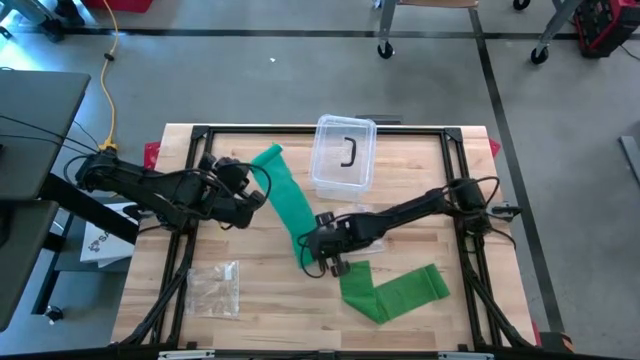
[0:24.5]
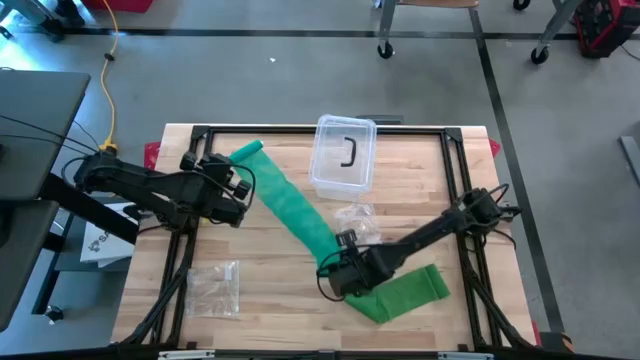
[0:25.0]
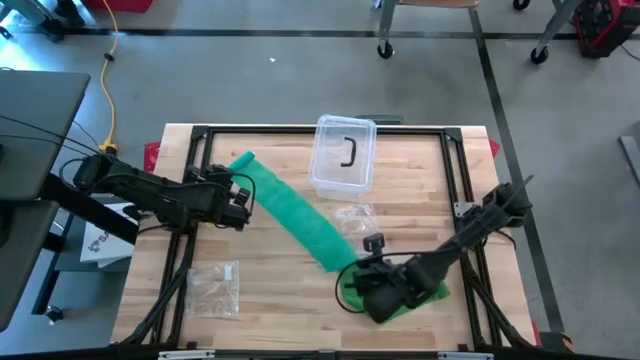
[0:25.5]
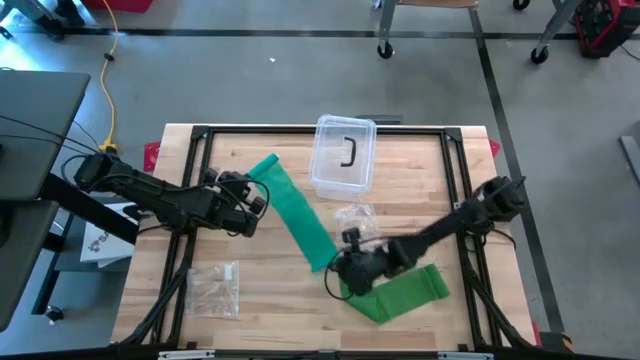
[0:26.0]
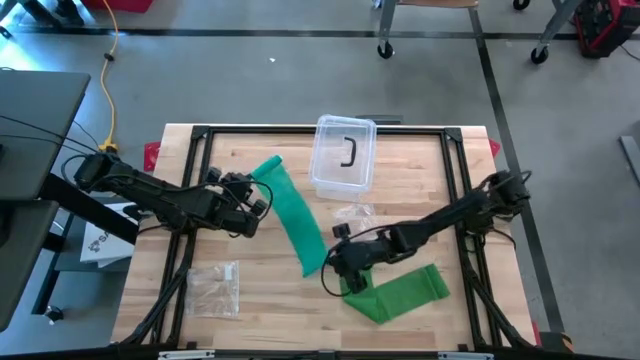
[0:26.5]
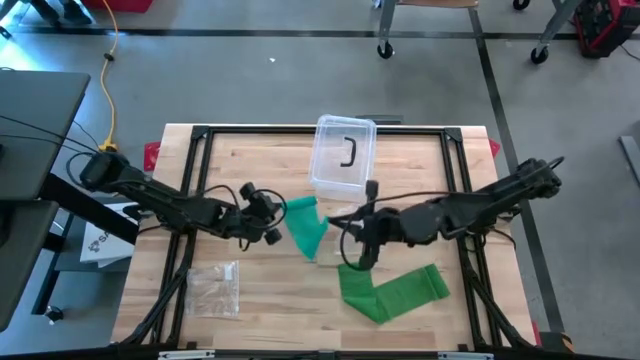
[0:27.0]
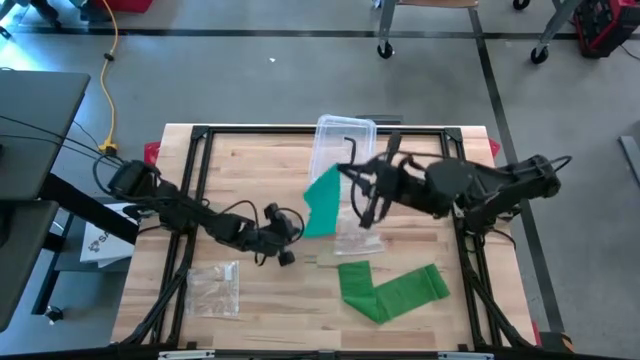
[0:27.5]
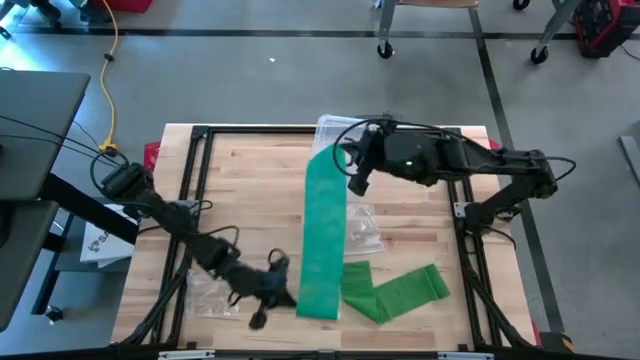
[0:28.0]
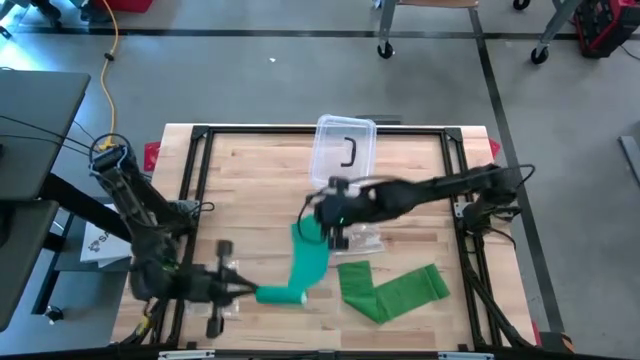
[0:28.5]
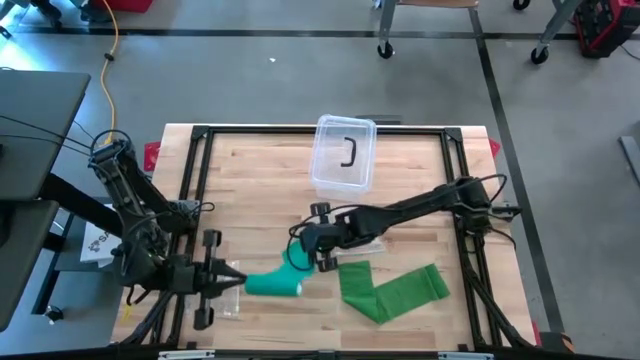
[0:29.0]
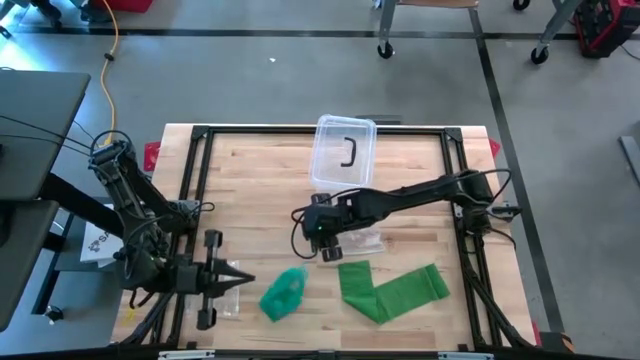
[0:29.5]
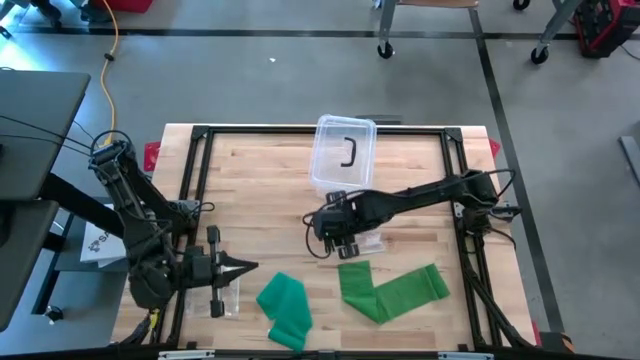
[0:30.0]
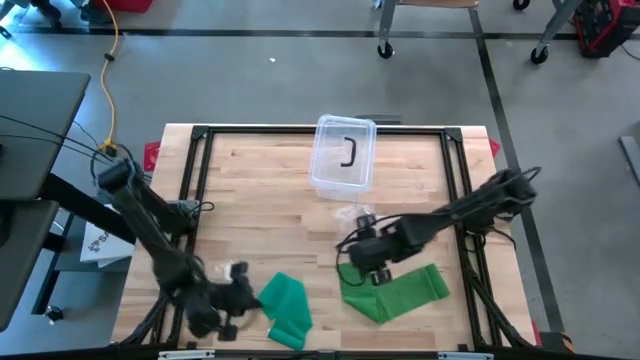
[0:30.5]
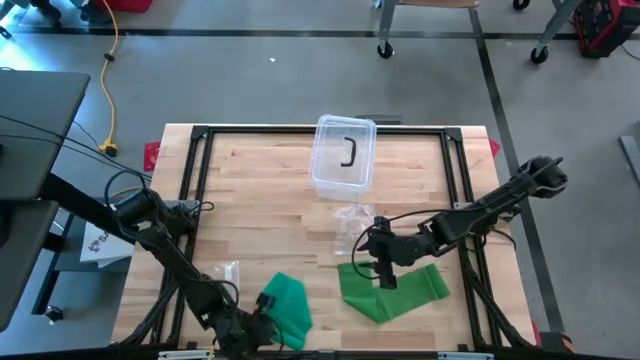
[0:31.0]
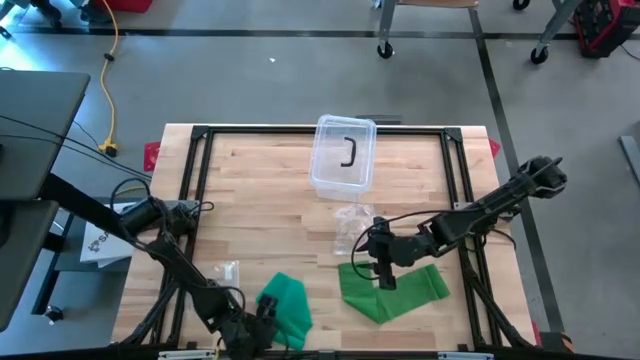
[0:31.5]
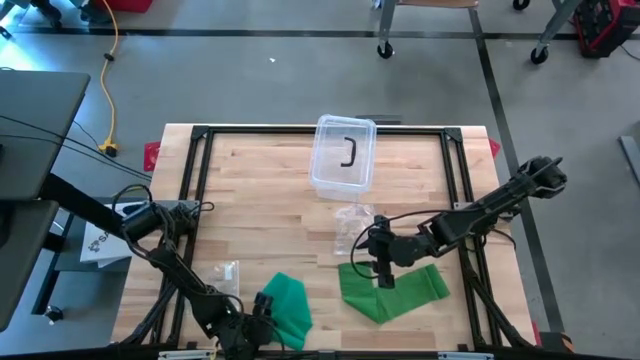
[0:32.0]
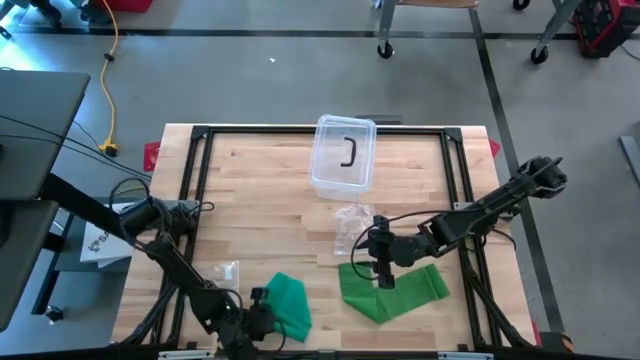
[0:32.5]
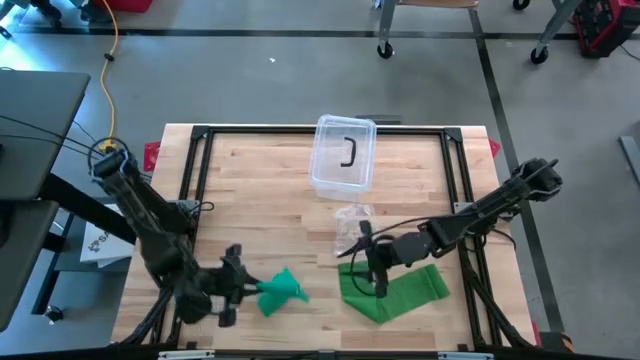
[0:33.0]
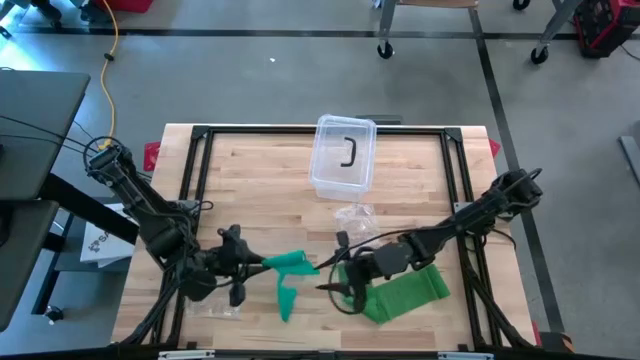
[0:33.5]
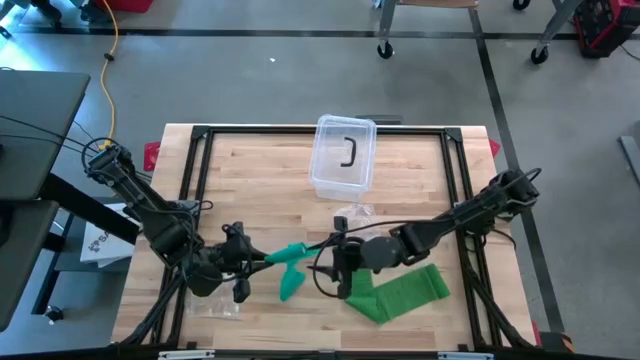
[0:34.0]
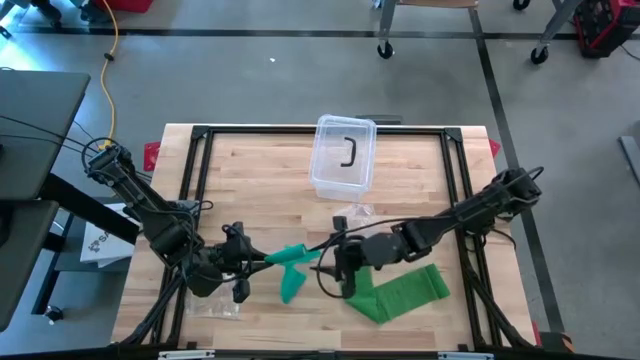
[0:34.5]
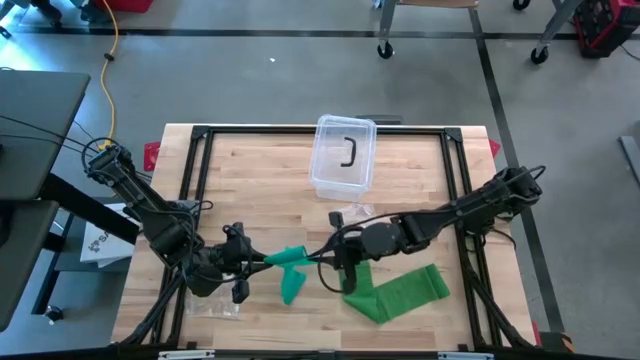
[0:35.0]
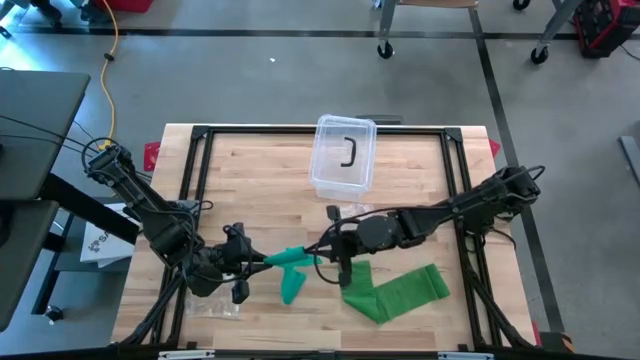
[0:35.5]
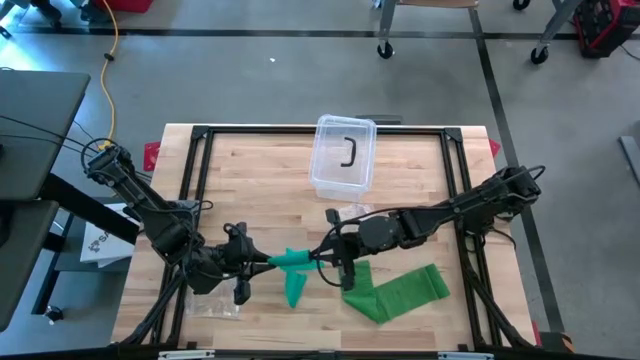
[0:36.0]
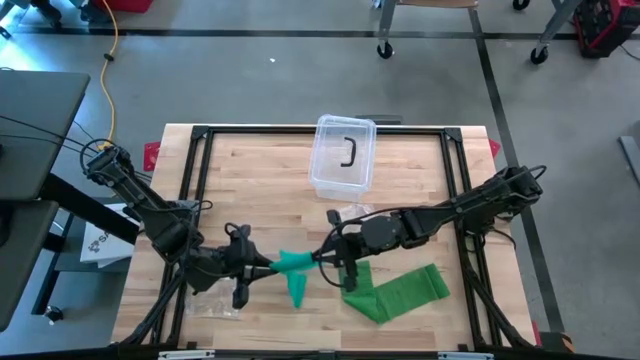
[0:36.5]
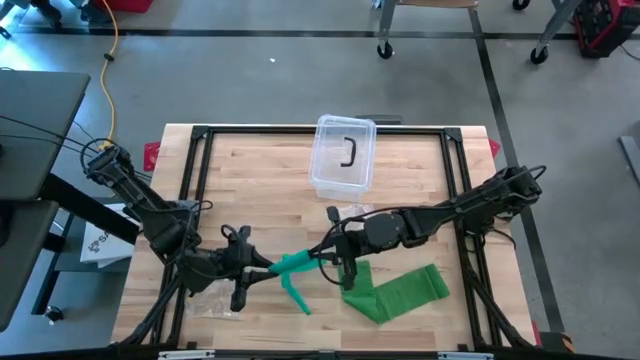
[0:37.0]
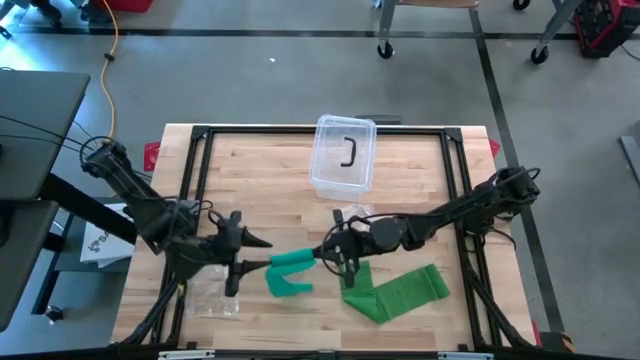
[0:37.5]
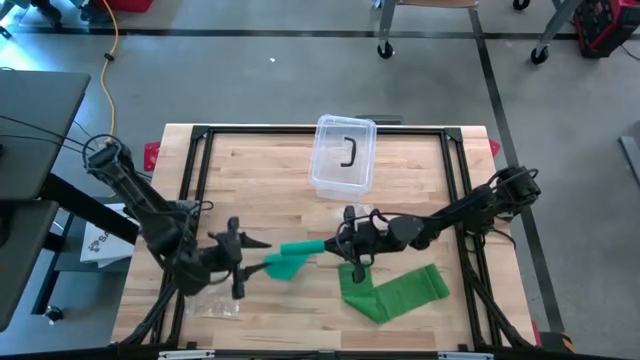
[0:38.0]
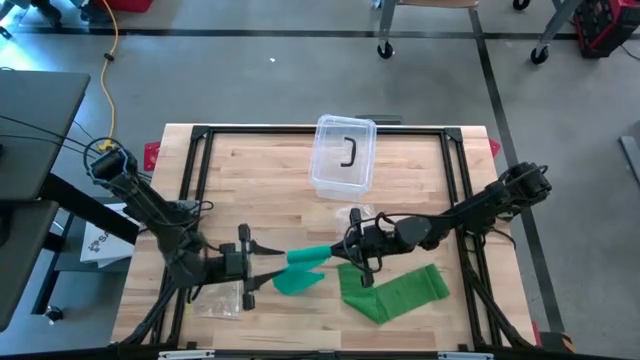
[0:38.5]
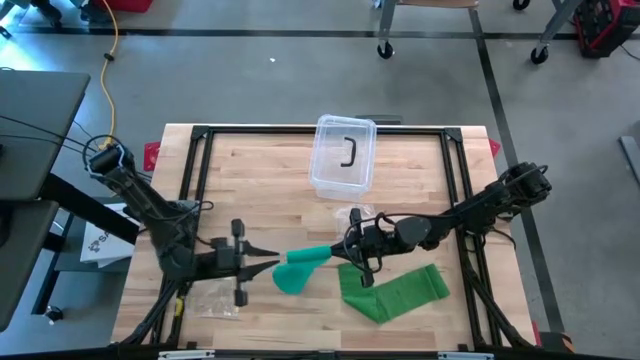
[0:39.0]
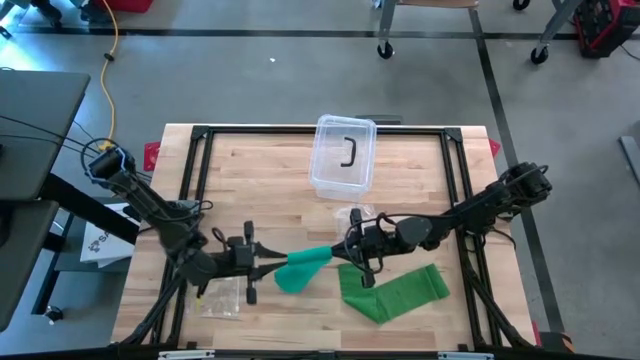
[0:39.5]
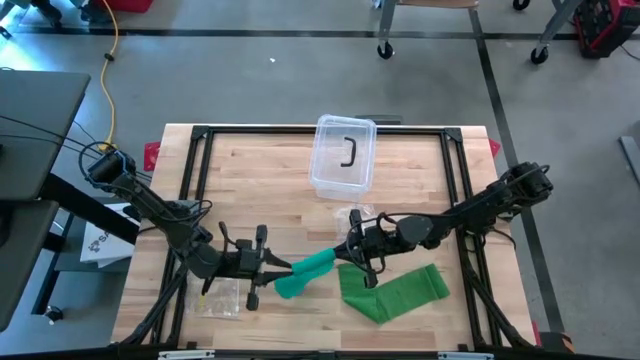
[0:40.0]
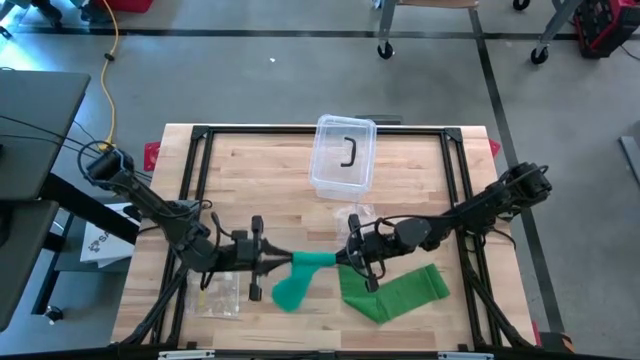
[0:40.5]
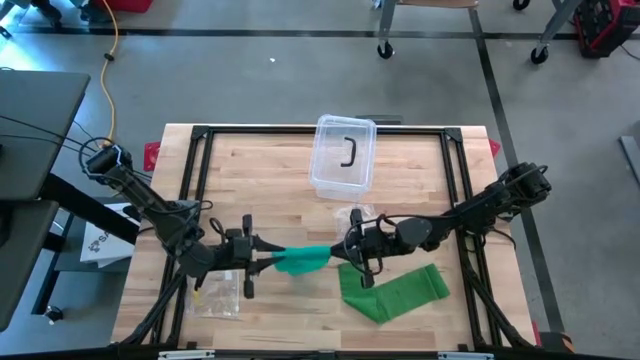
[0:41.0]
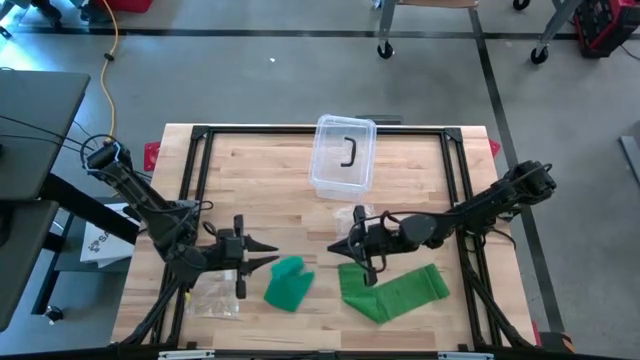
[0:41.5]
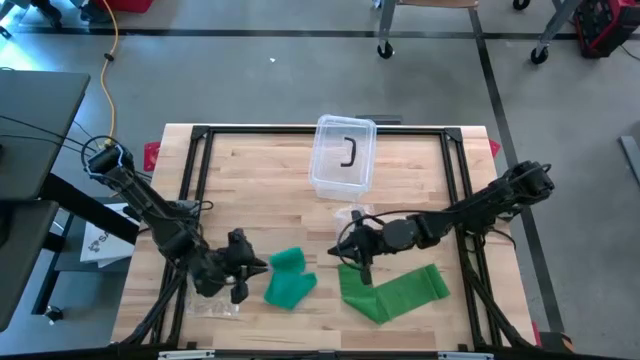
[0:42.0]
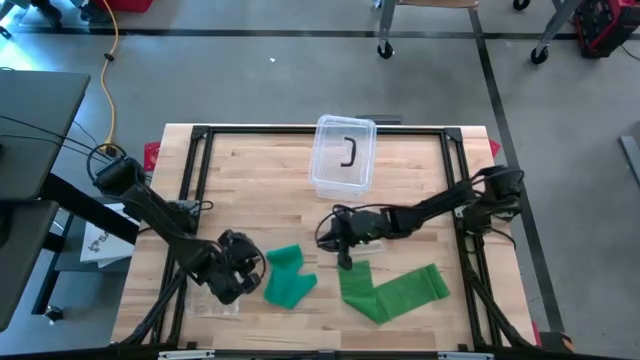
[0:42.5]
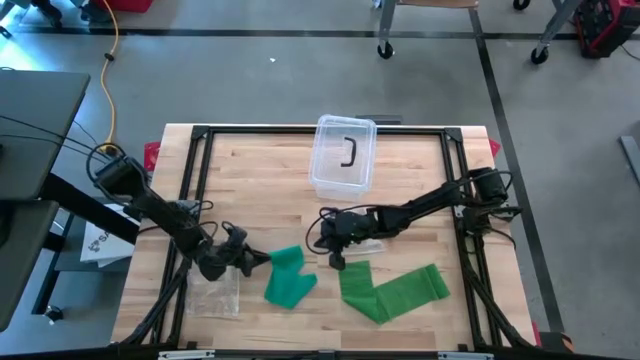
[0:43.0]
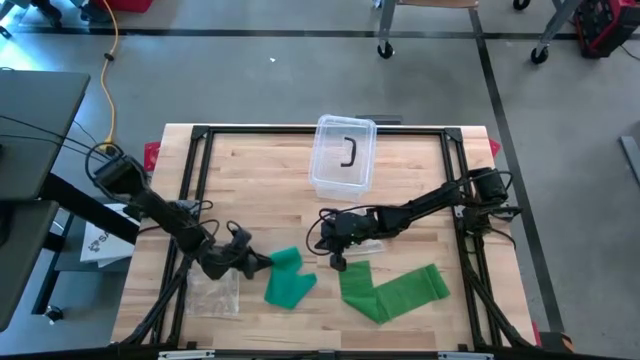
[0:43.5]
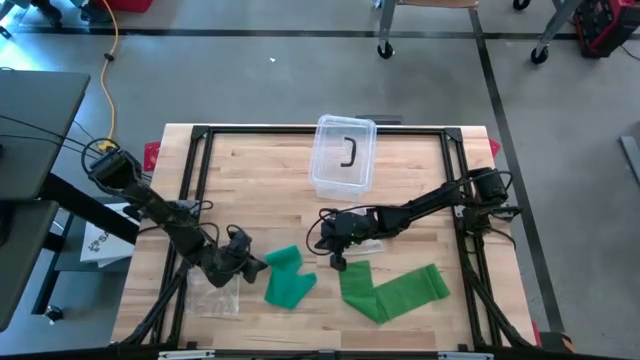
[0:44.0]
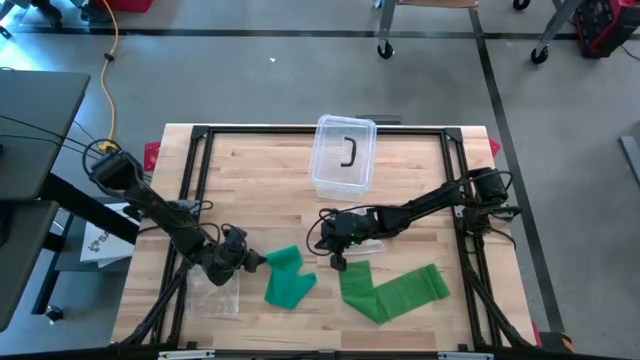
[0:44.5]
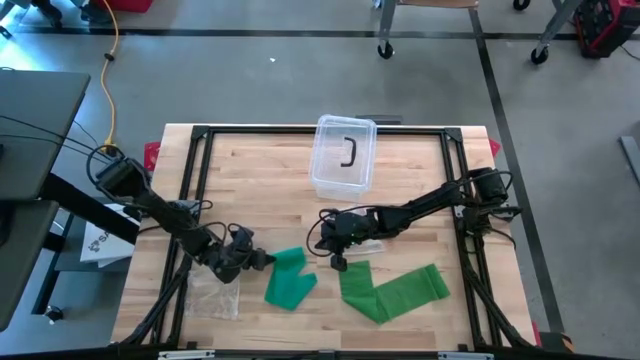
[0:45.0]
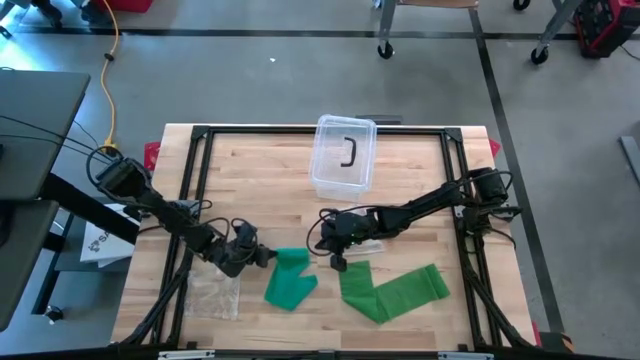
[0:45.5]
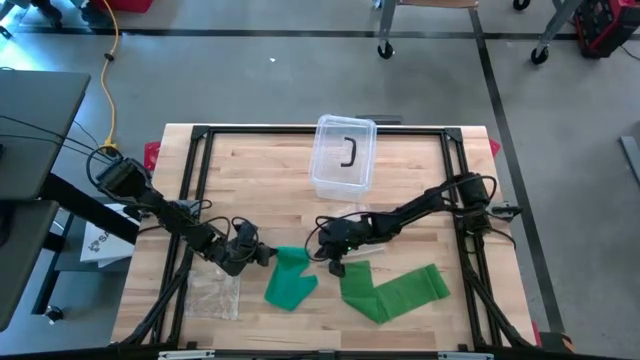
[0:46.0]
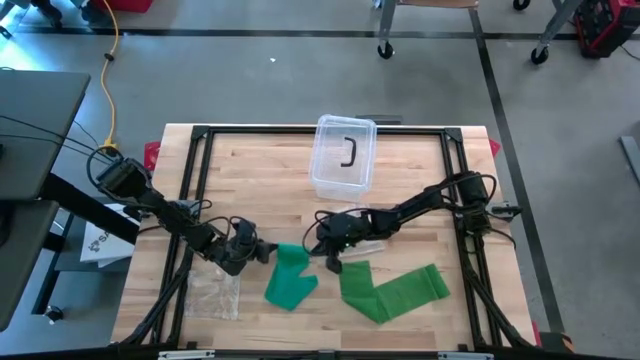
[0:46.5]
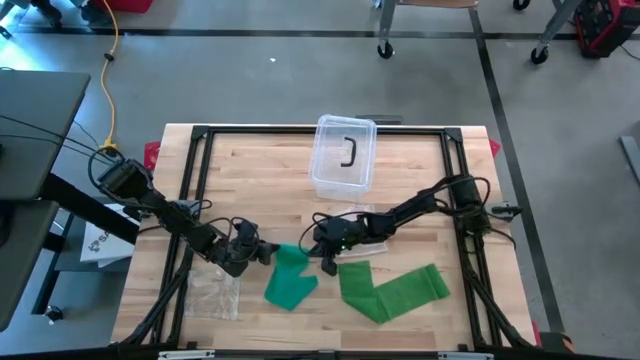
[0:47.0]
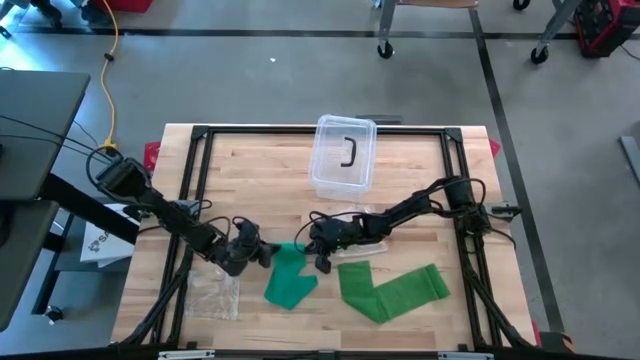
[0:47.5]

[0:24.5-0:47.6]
Task: Roll bandage
Roll the blue bandage
